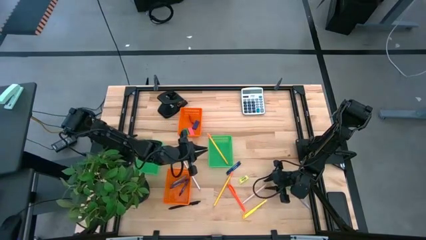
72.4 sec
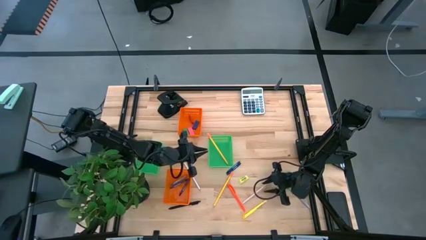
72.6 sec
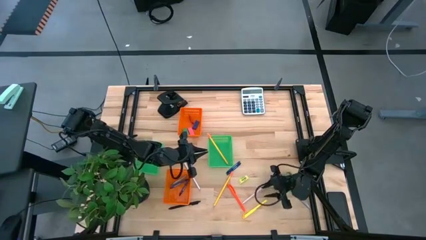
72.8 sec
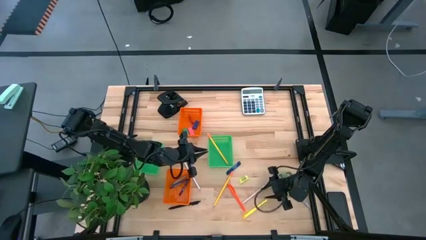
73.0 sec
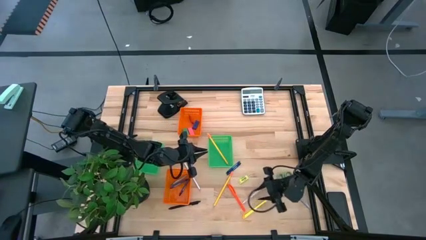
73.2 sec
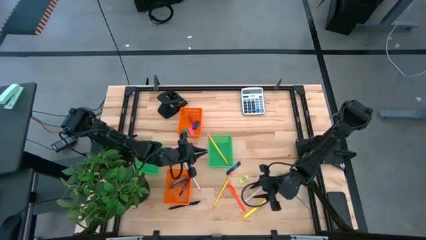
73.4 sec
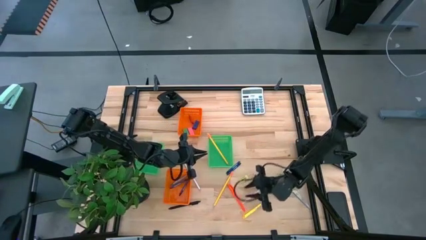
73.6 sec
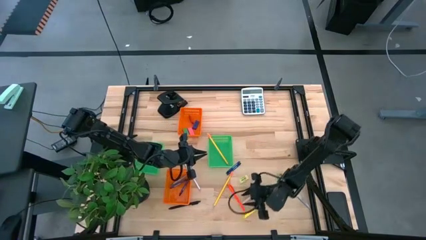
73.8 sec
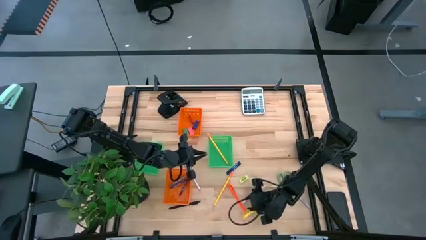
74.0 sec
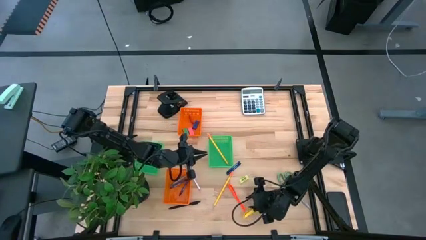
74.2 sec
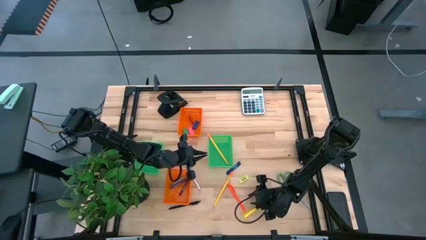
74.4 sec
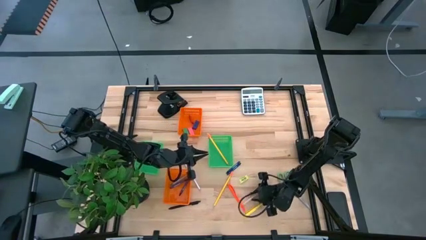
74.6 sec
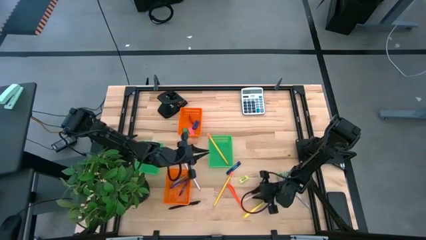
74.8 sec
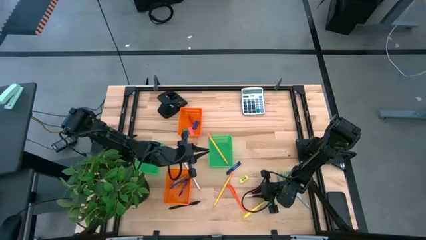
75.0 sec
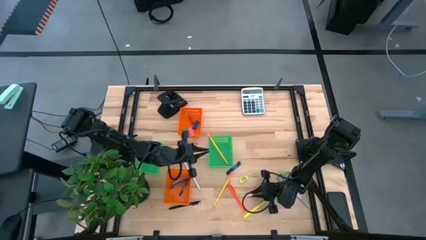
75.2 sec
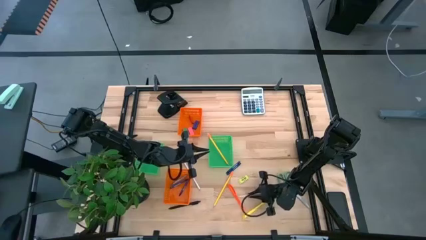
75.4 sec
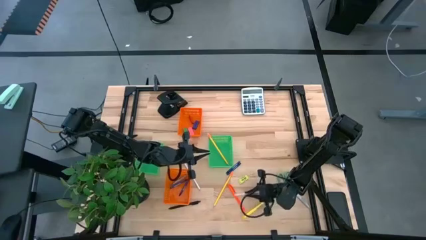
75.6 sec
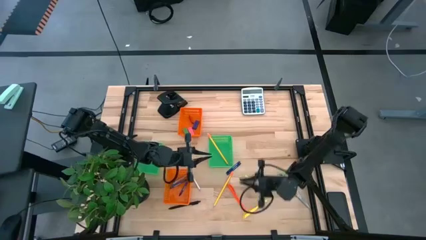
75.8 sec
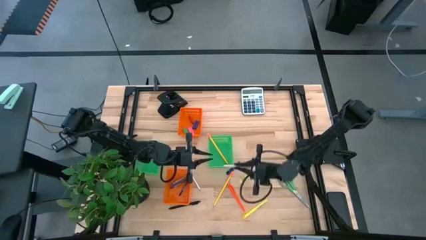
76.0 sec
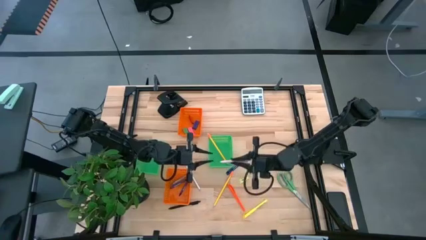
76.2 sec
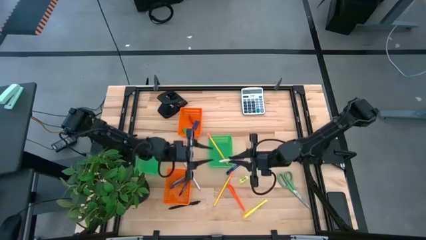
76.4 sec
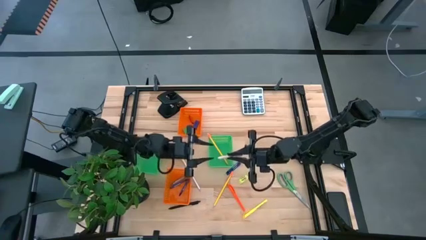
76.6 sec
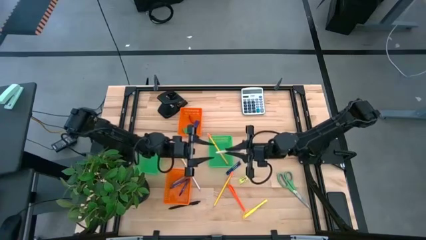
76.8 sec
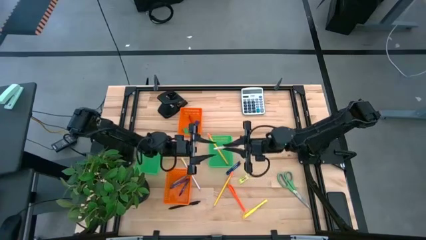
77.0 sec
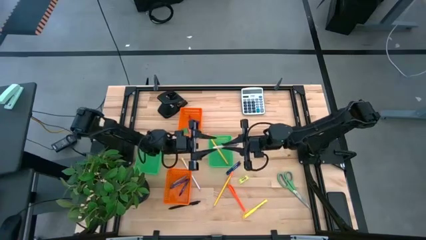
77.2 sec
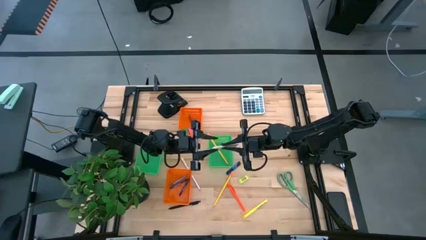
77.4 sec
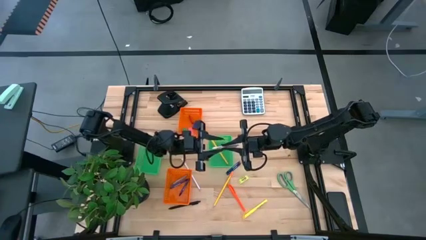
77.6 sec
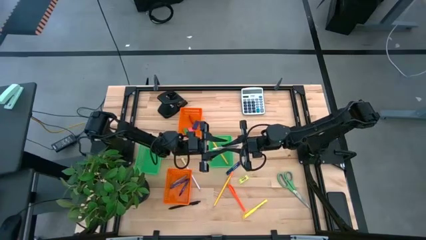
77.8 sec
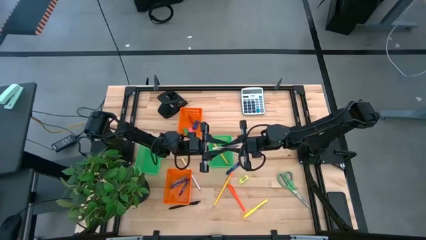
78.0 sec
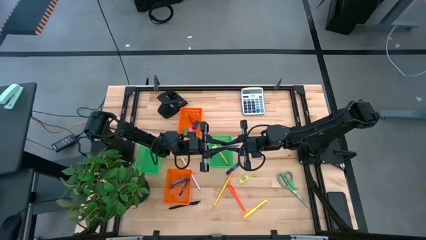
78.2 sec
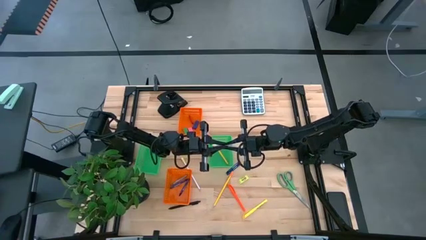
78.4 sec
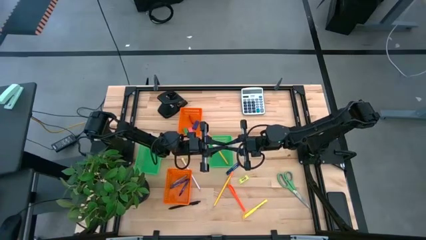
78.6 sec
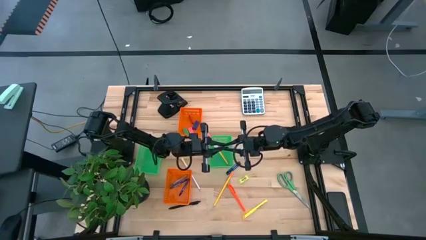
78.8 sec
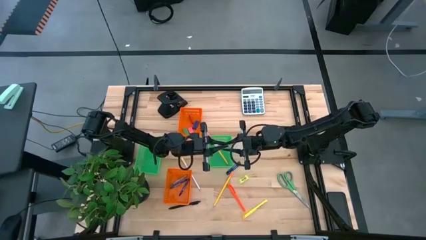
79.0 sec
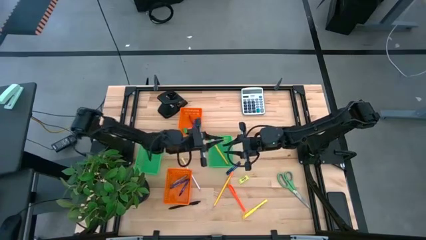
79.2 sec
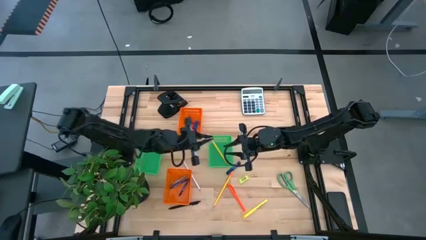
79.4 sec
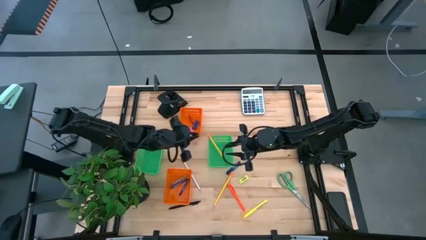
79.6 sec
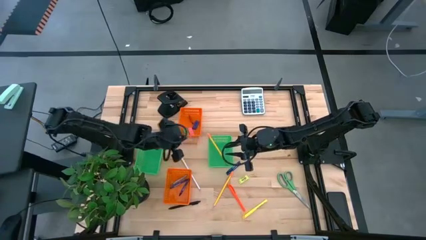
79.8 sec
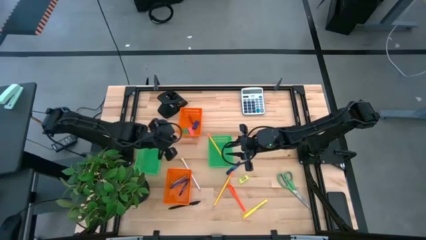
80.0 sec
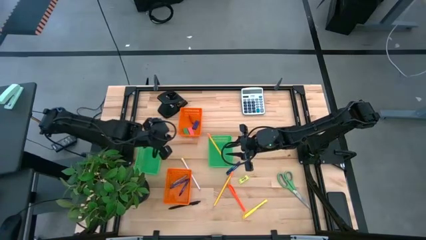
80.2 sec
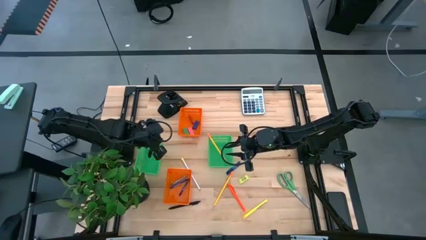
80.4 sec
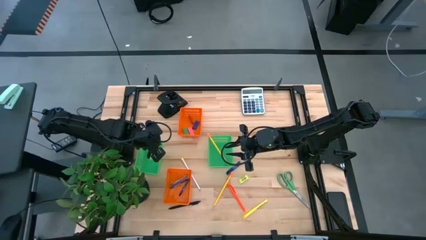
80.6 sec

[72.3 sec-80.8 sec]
Task: Sort crayons/erasers/pens/pencils in bins
Put the pink pen into the left green basket

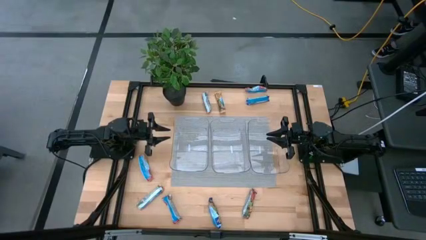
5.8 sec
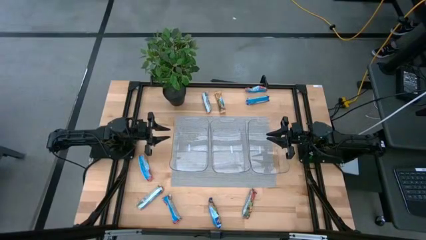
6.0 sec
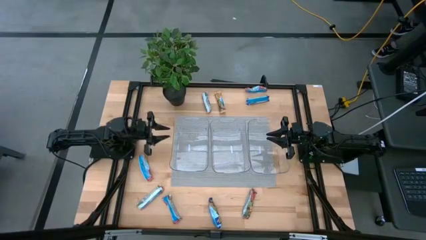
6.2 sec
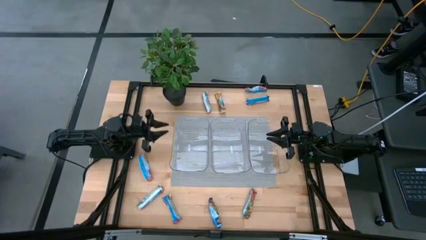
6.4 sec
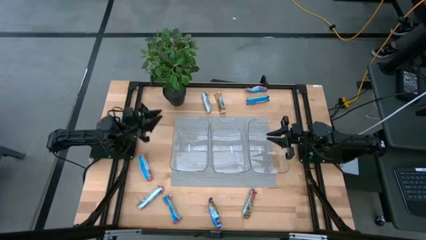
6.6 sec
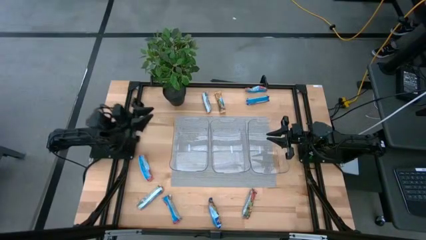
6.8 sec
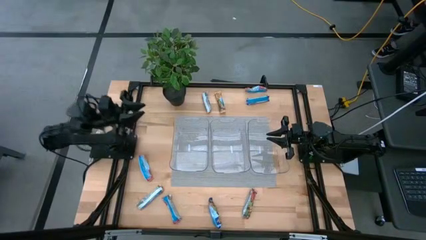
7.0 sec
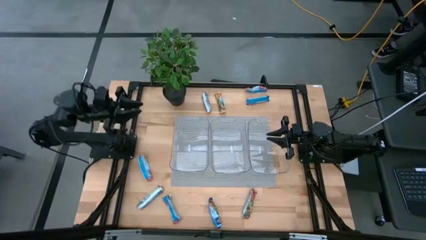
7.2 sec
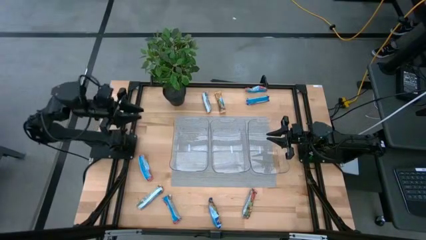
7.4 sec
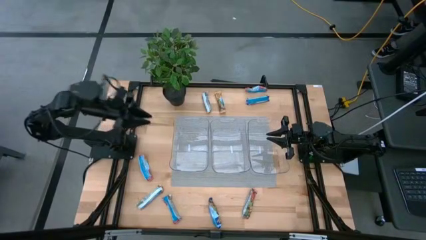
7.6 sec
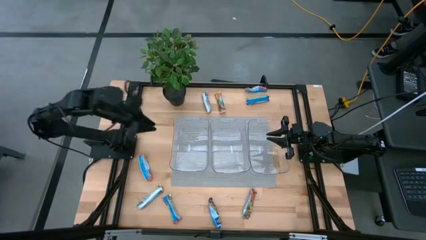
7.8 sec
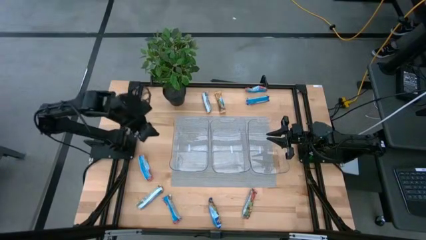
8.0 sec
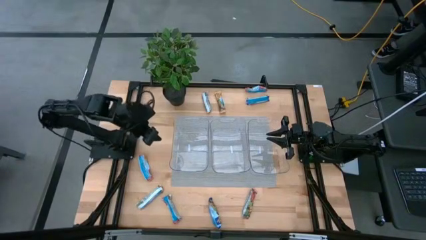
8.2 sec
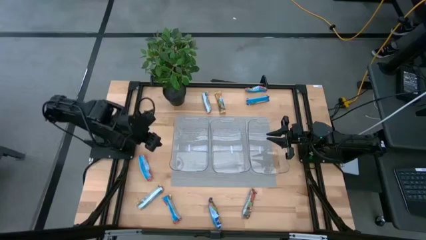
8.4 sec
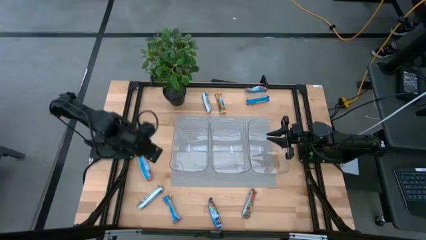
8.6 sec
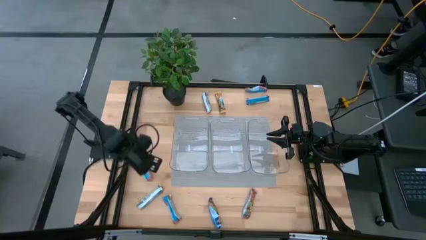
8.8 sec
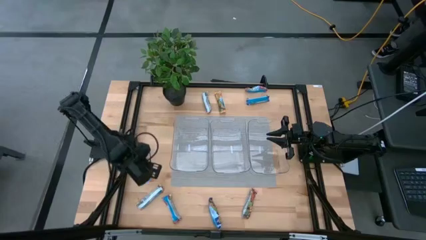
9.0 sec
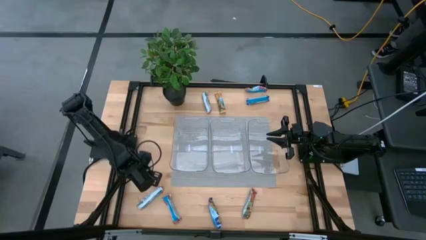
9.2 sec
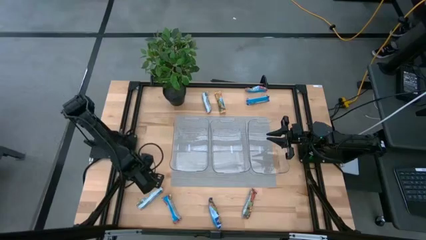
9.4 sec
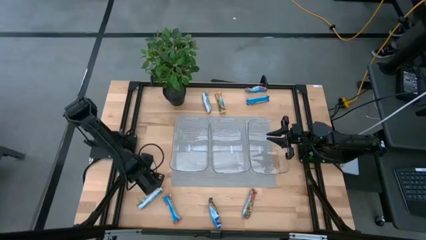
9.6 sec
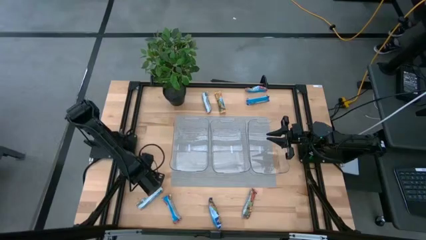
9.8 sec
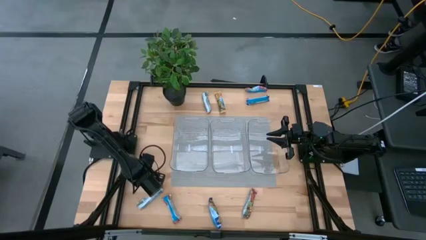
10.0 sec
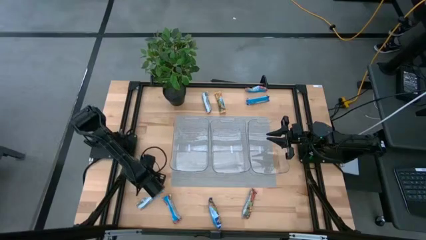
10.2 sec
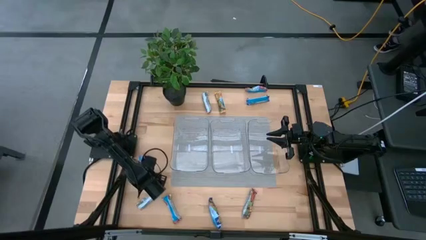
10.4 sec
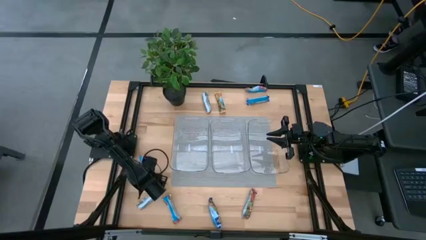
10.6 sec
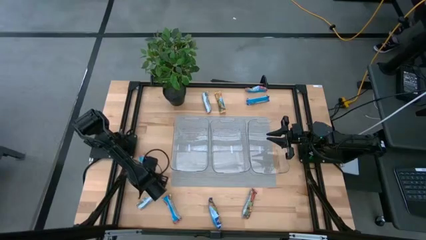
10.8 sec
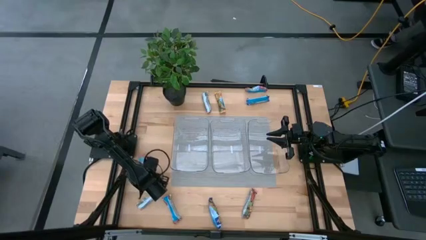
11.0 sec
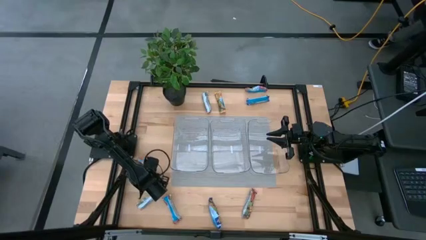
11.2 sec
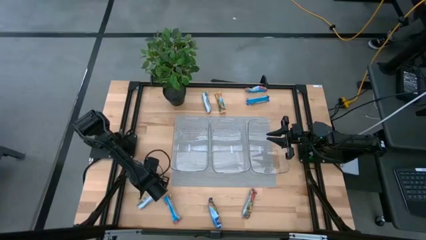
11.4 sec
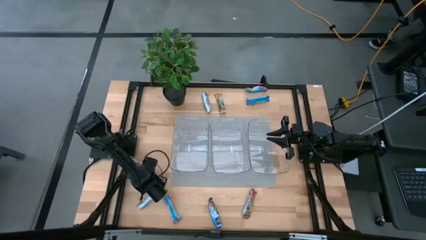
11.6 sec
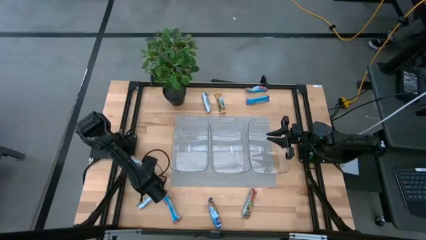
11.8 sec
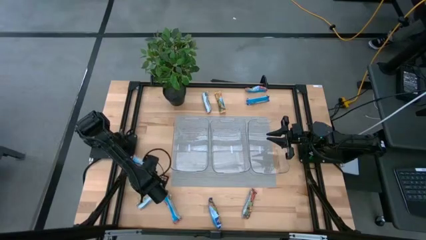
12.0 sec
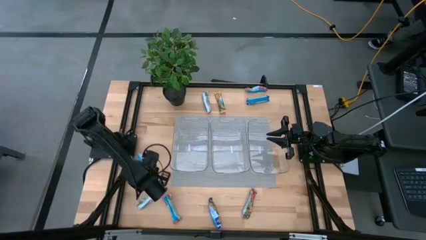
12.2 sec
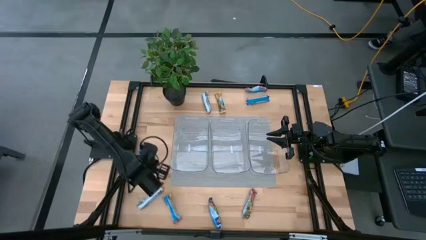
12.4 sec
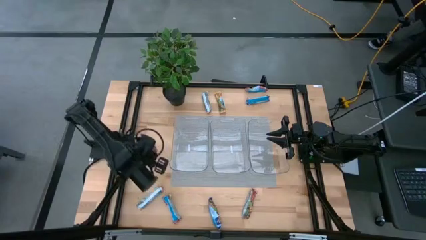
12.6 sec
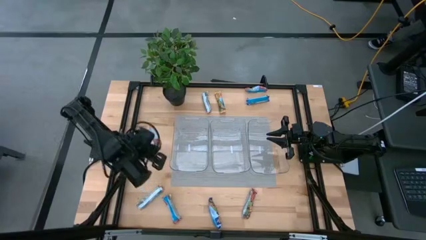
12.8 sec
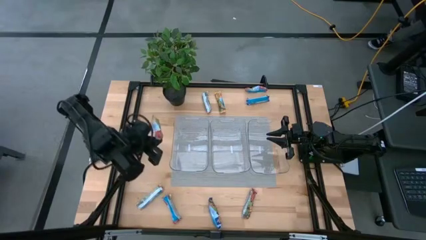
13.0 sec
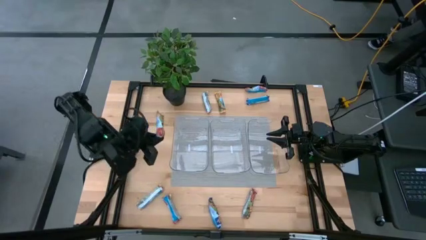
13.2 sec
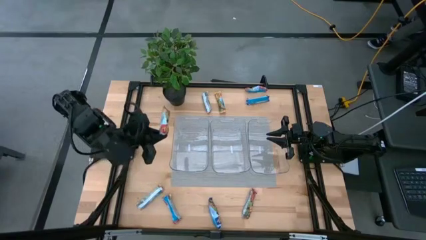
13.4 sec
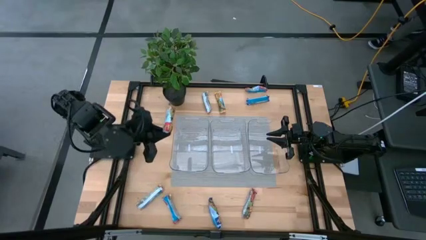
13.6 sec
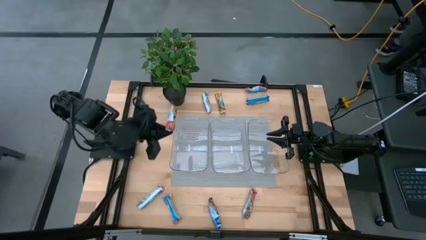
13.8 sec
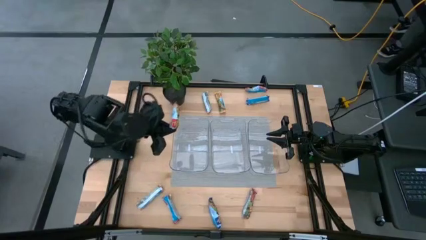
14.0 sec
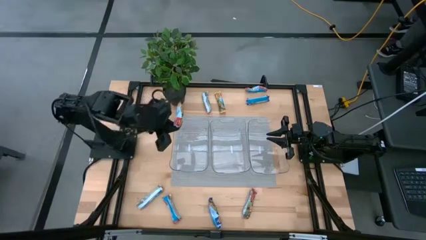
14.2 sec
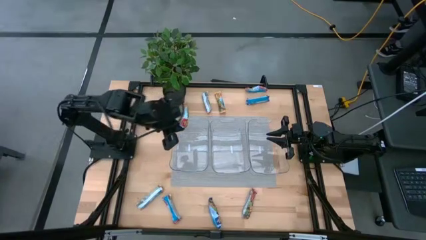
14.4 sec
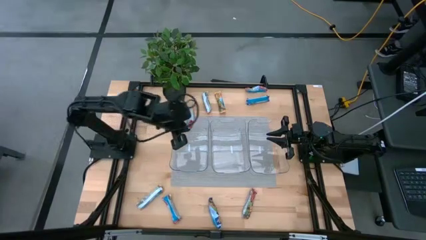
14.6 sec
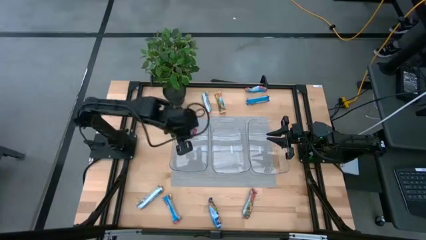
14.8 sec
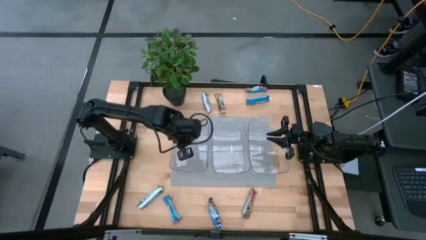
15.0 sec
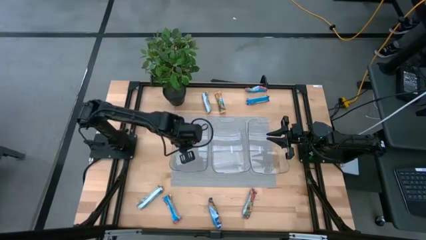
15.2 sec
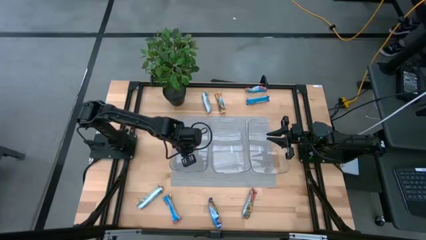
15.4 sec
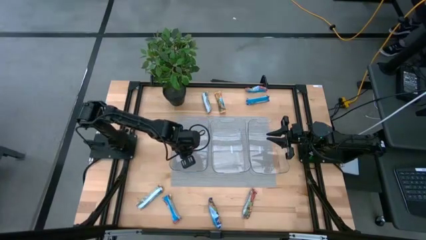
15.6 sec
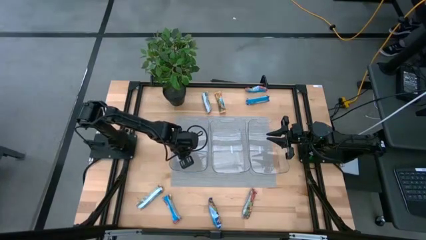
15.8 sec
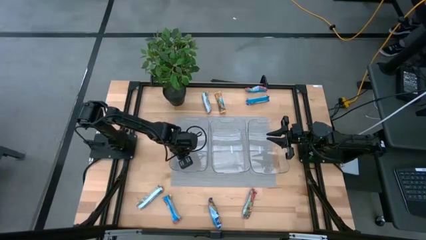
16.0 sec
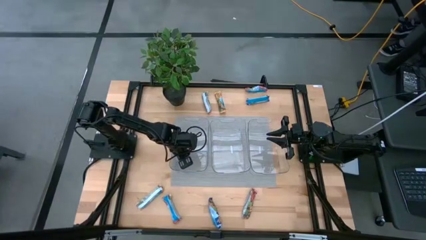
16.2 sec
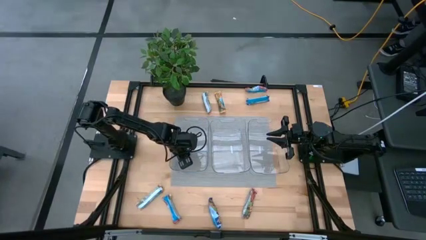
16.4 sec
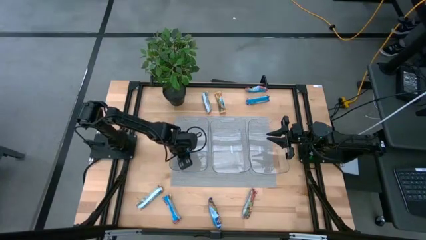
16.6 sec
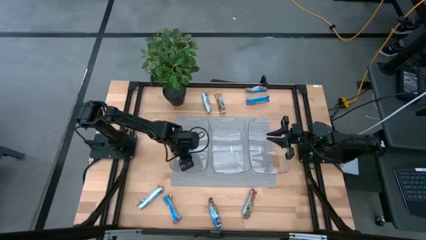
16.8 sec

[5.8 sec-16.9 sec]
Task: Pick and place Granola Bars by type
Put the red granola bar into the left transparent bin
